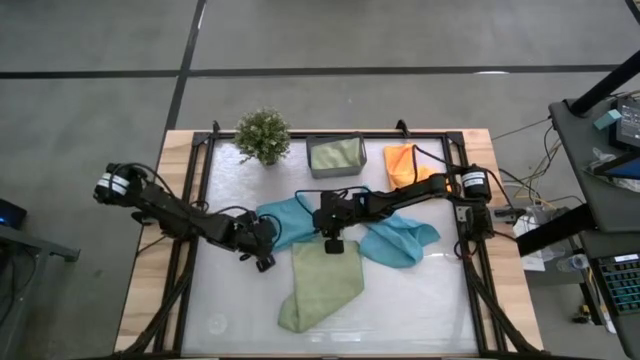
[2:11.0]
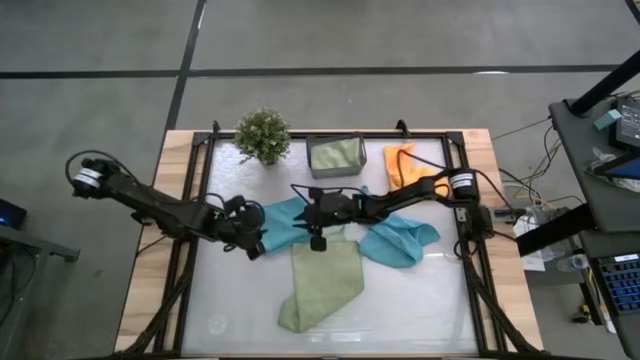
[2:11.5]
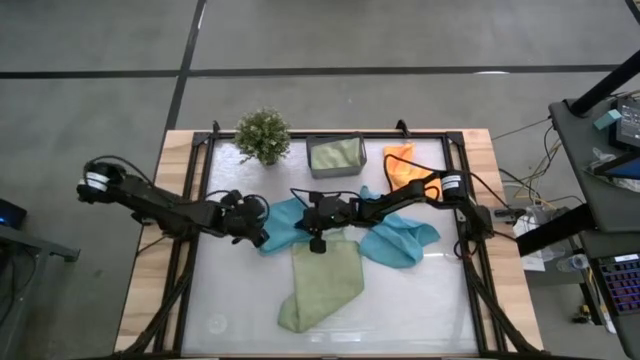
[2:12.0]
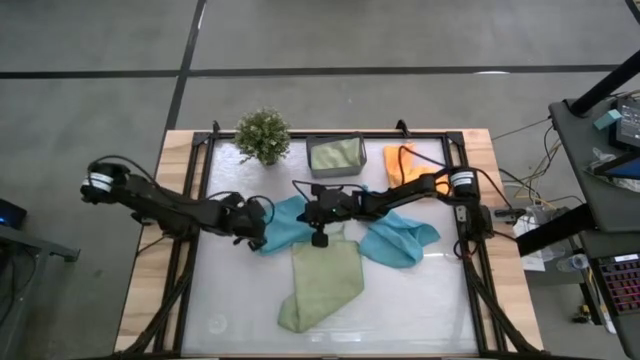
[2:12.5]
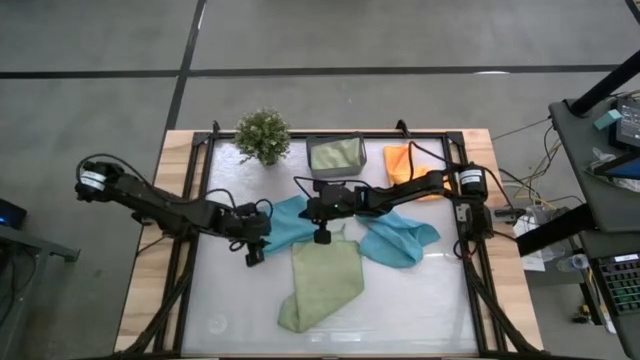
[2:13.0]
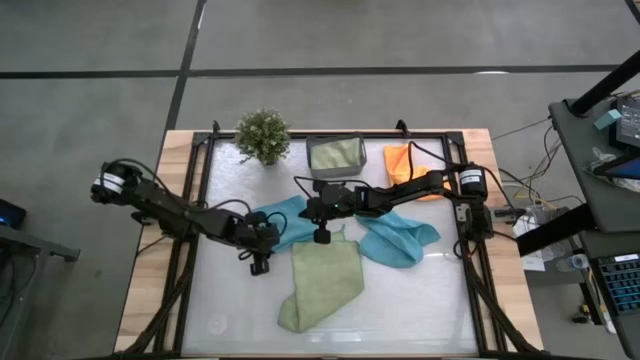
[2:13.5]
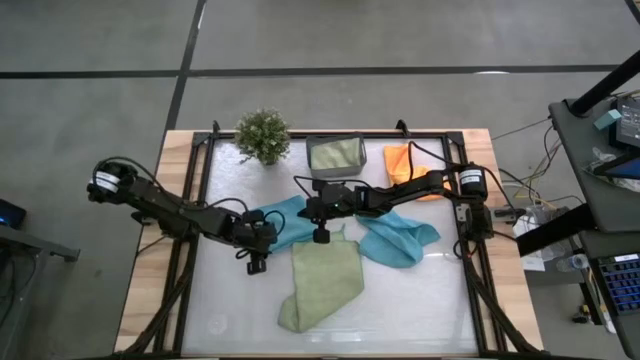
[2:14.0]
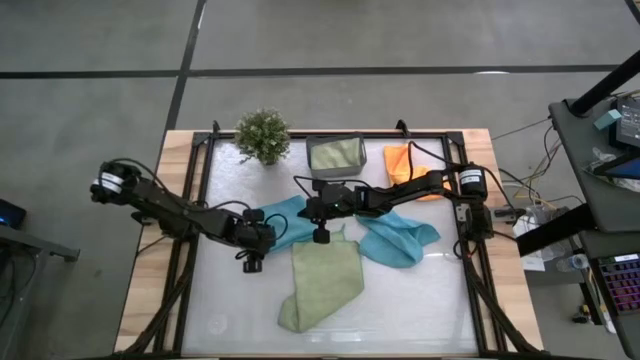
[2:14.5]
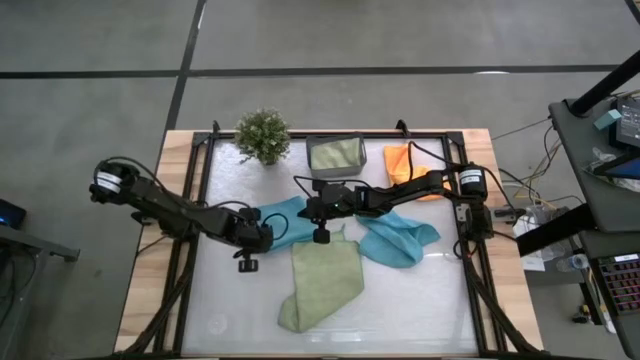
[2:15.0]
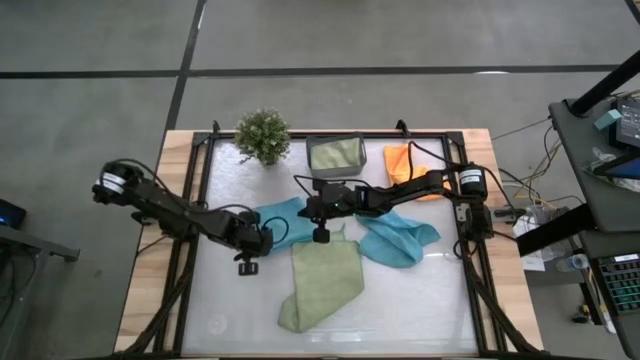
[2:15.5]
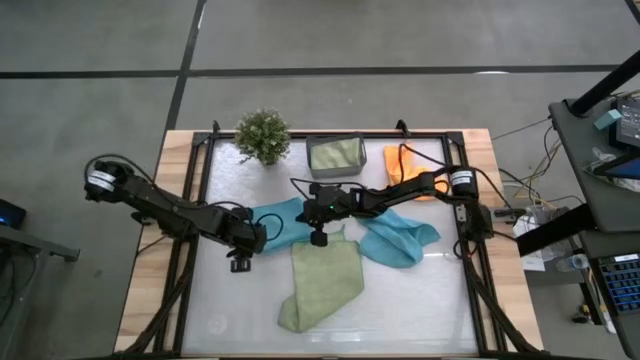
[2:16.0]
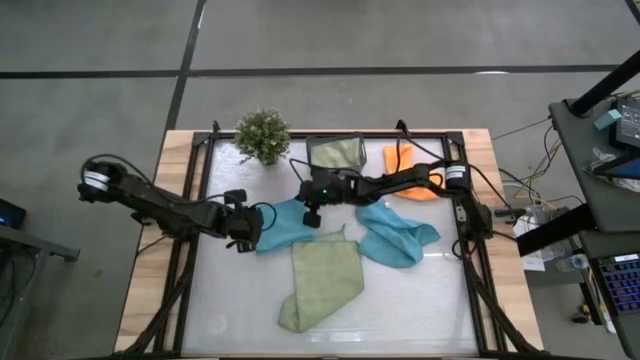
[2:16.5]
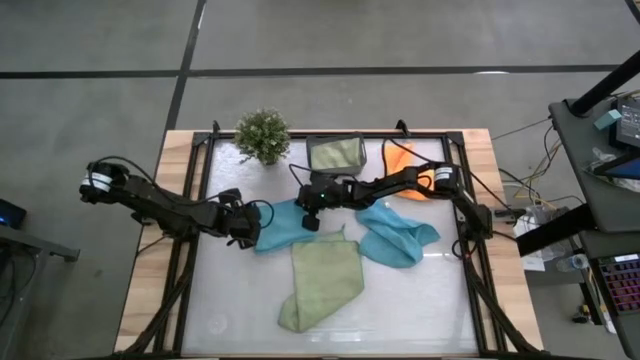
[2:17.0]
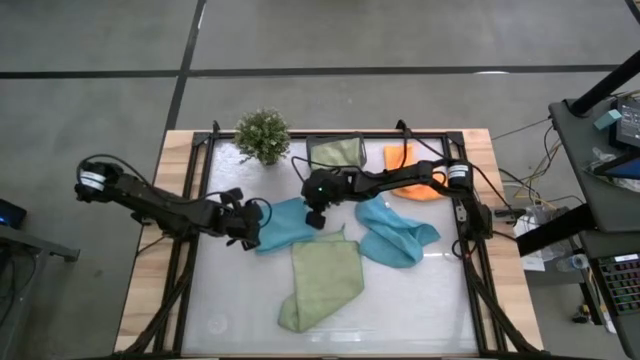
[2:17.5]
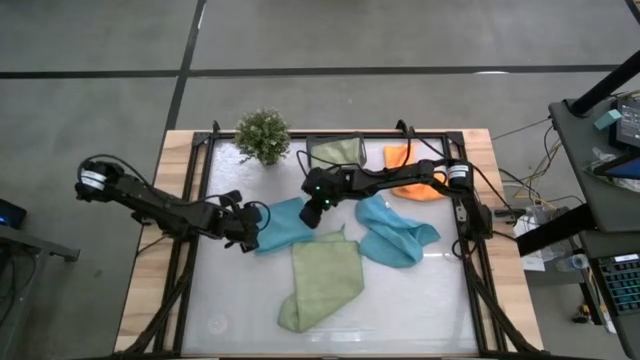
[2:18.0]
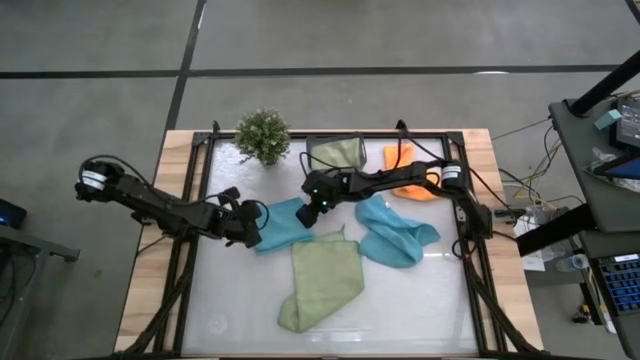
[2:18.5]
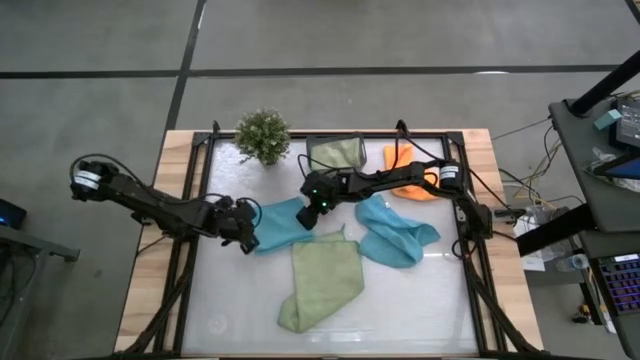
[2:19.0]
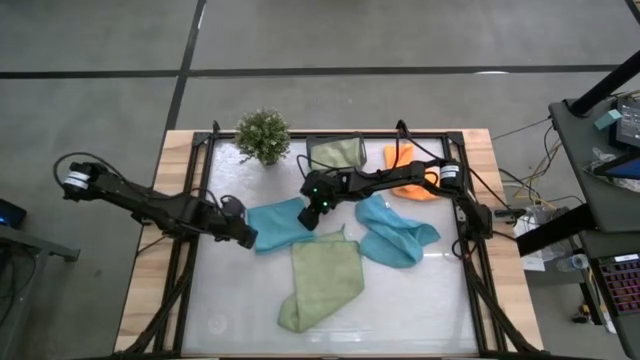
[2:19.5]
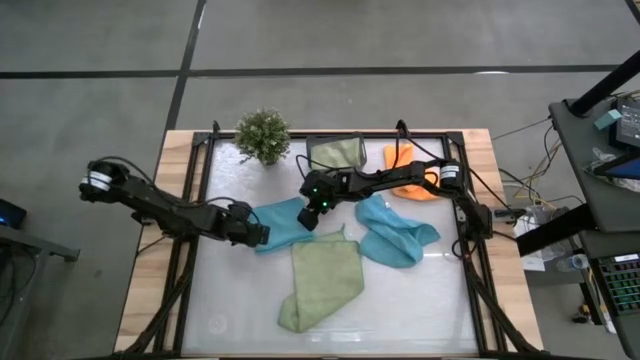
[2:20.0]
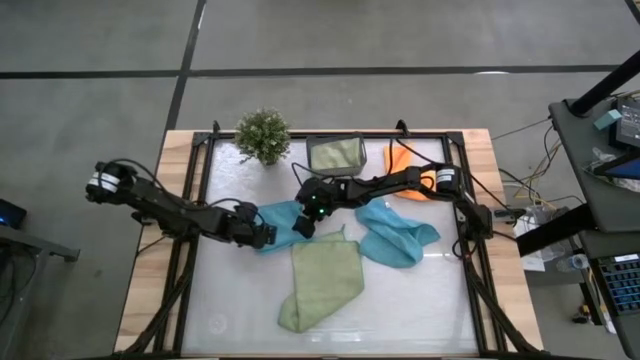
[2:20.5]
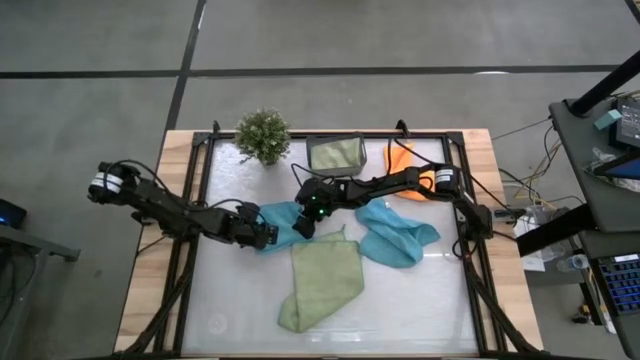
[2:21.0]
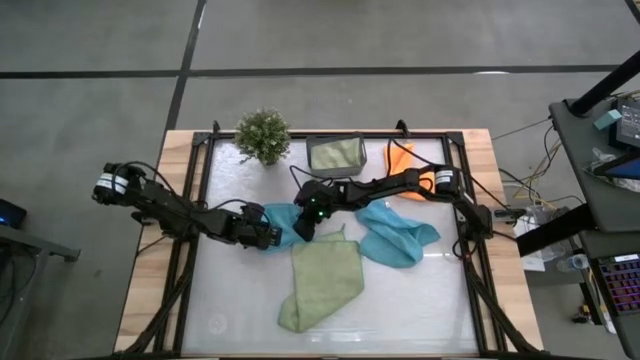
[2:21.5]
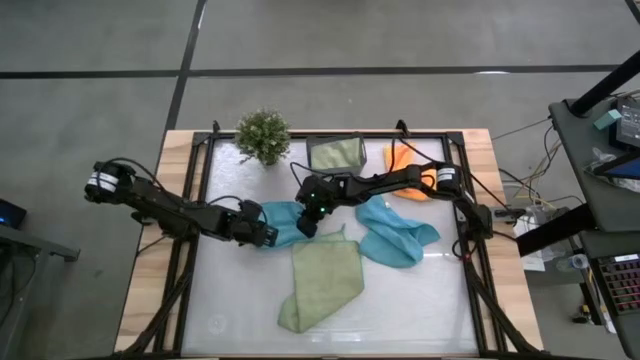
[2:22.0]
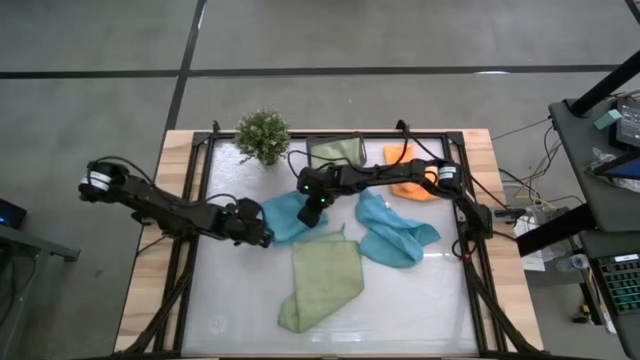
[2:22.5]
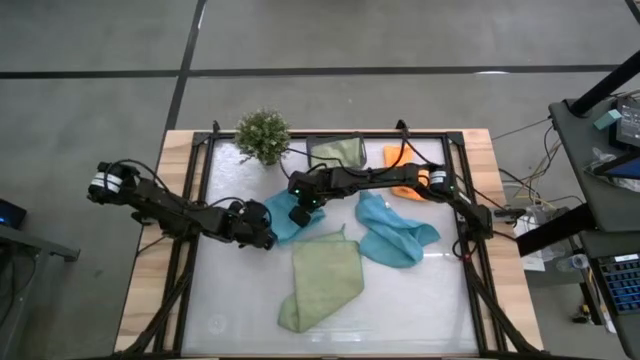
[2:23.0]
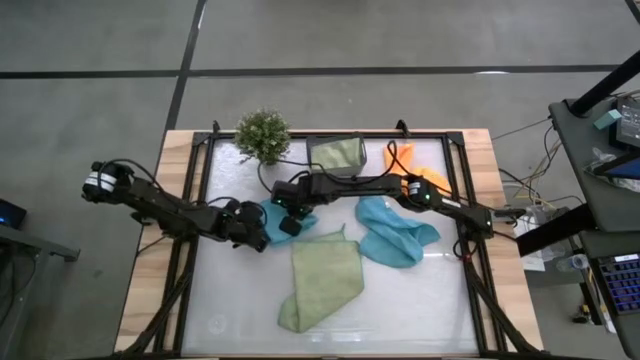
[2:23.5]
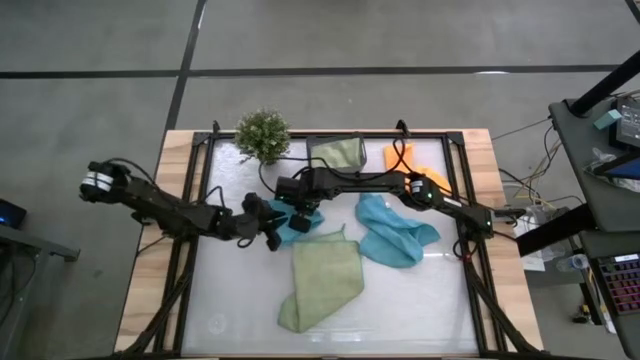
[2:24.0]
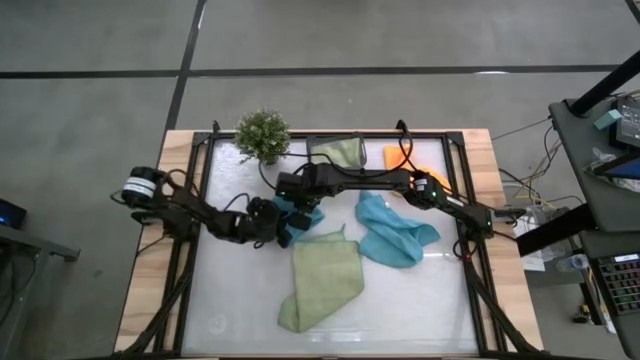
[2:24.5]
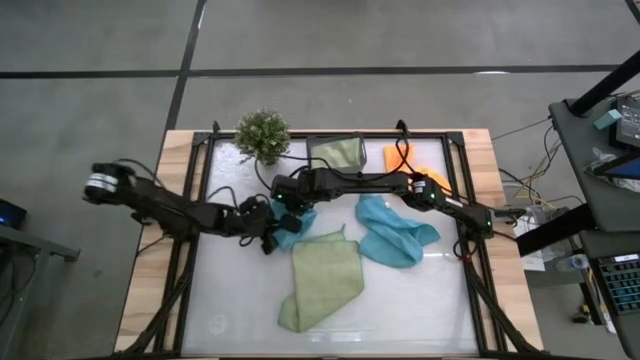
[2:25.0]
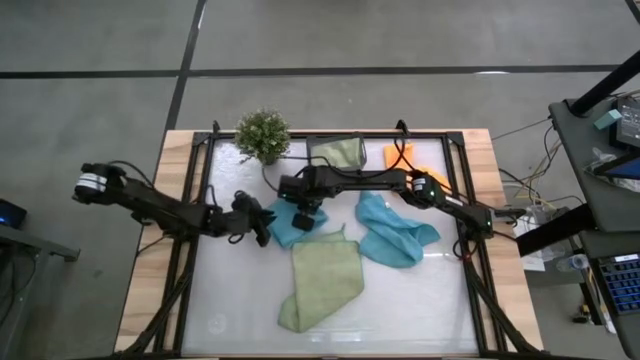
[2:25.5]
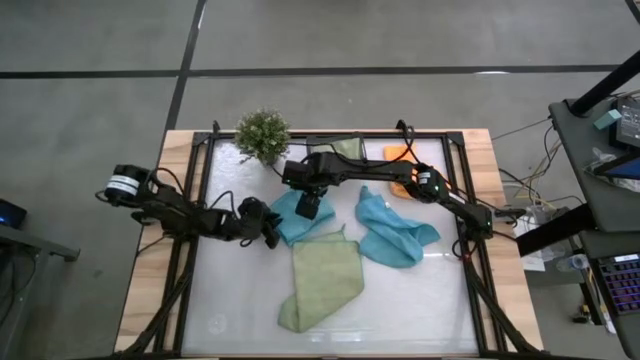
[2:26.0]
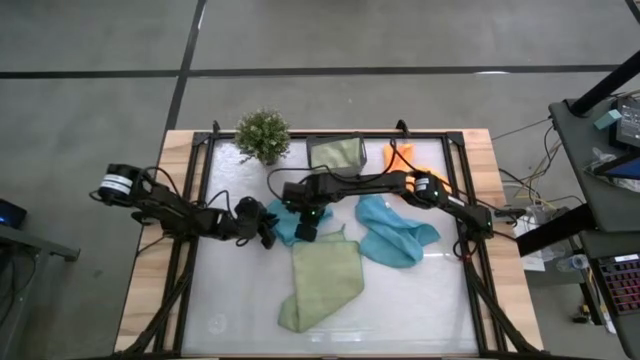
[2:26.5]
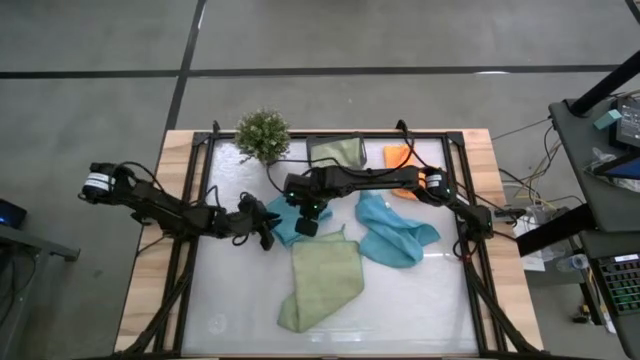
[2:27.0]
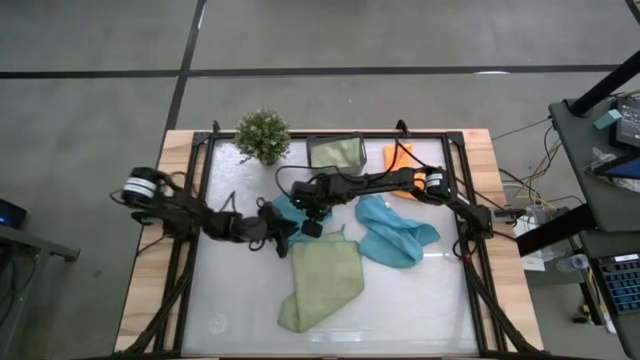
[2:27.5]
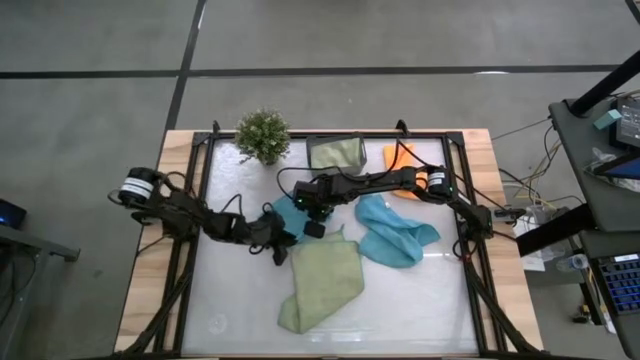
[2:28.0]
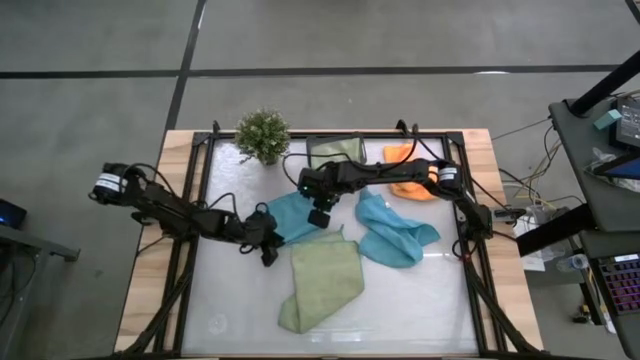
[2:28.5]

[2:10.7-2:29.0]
Task: Fold microfiber towels
Fold the left blue towel

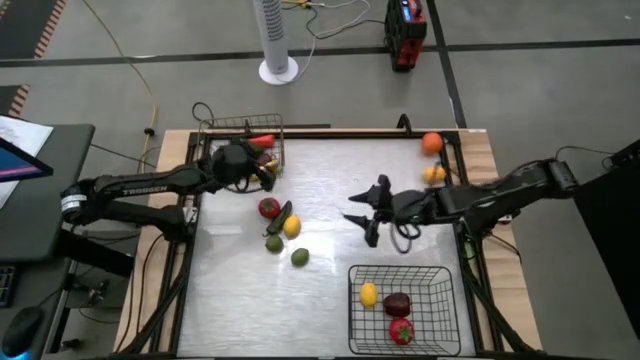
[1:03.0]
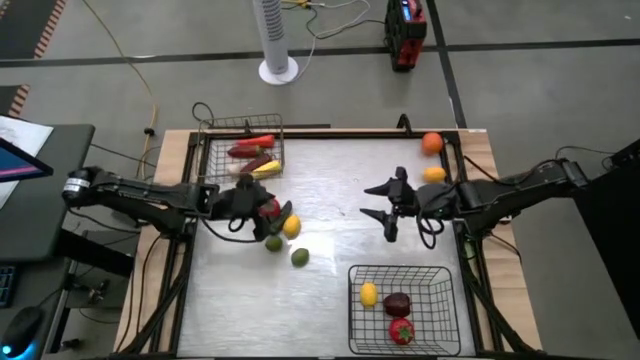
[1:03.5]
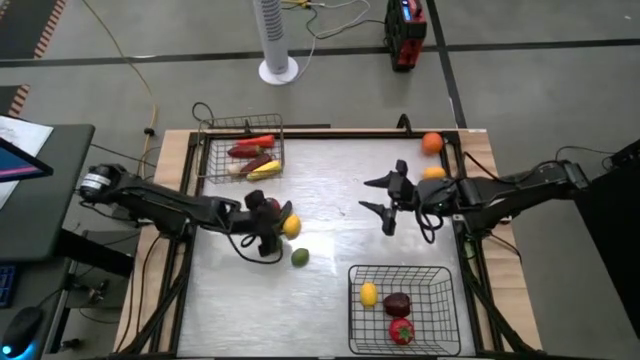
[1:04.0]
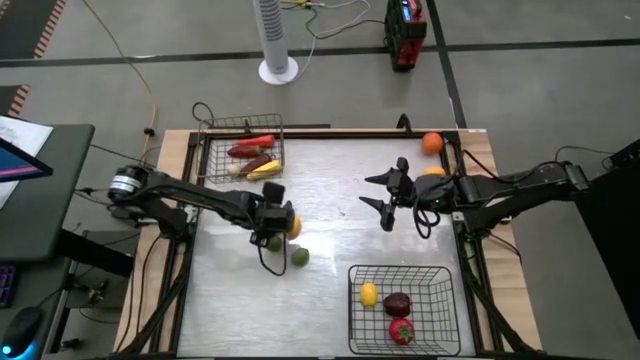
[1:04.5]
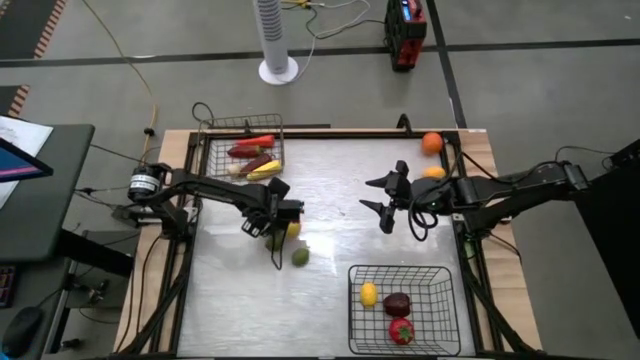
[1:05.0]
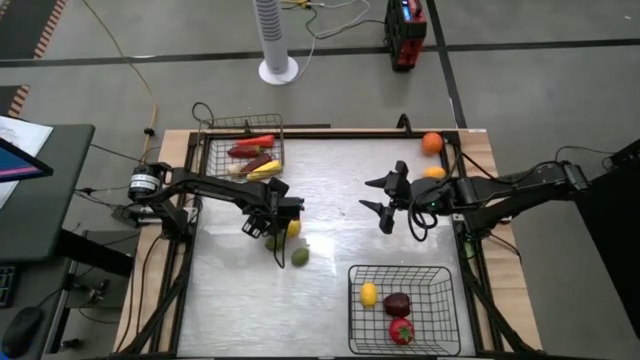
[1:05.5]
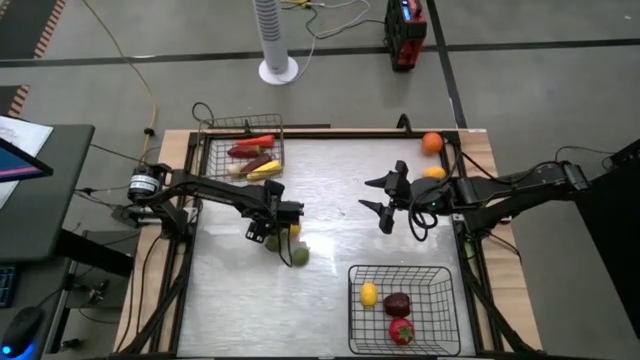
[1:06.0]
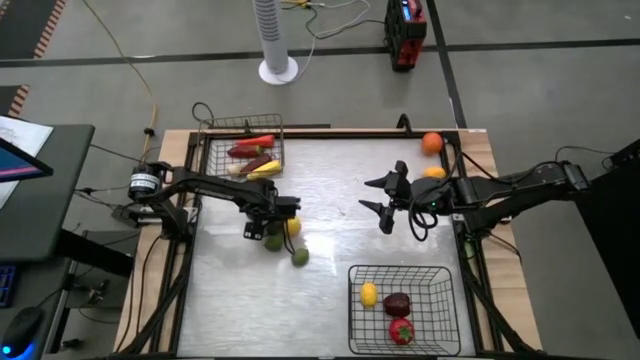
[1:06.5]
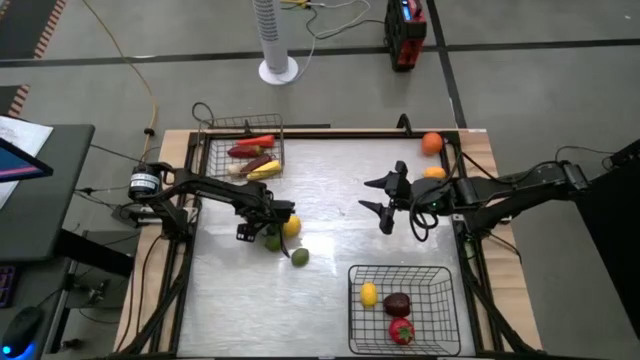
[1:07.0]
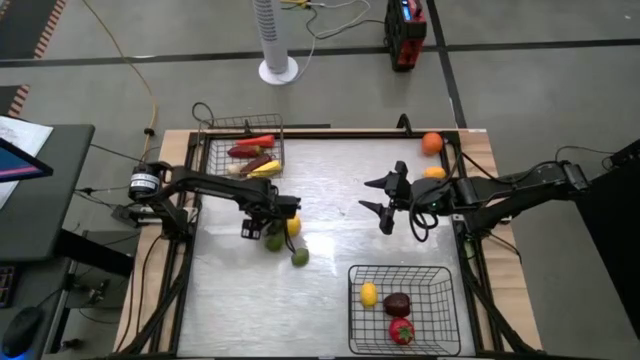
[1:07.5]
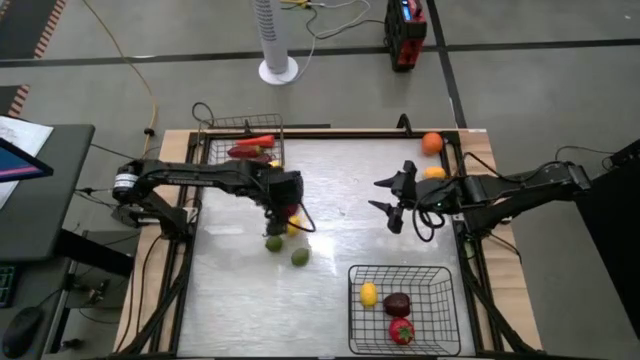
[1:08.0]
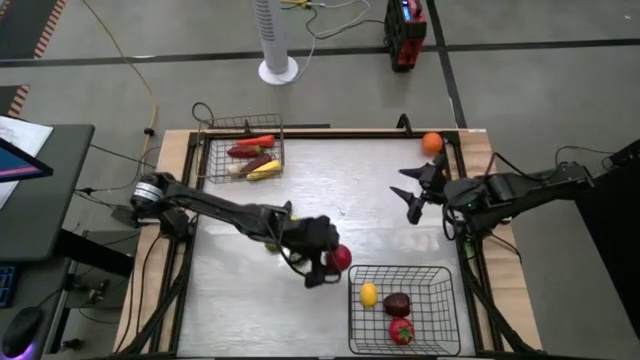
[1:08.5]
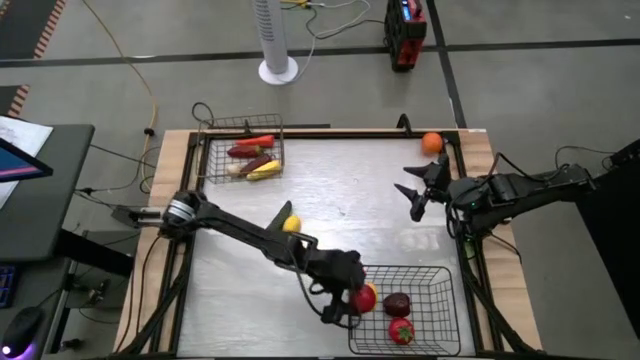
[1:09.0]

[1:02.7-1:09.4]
Task: Sort produce into baskets
Put the tomato into the bottom wire basket
